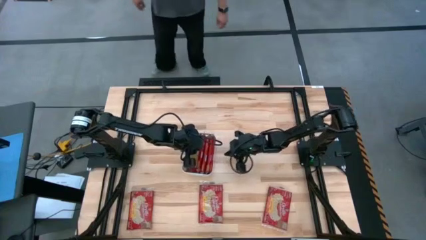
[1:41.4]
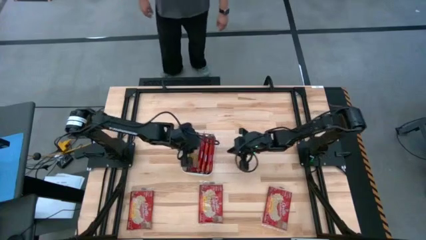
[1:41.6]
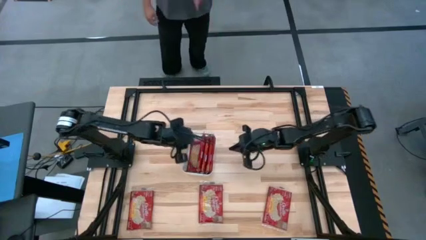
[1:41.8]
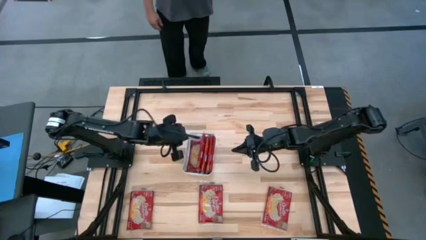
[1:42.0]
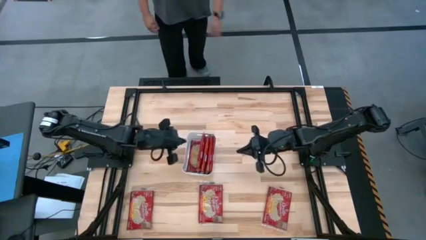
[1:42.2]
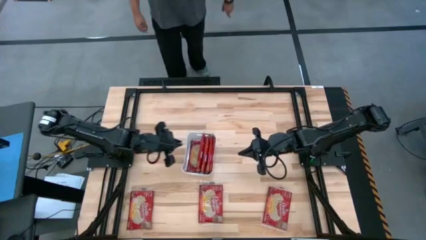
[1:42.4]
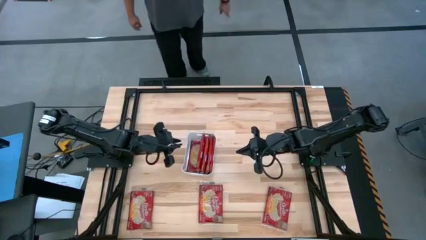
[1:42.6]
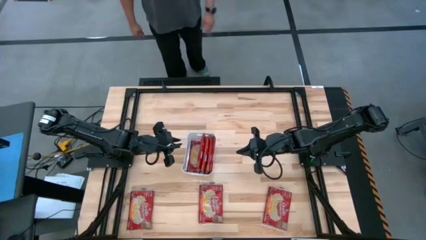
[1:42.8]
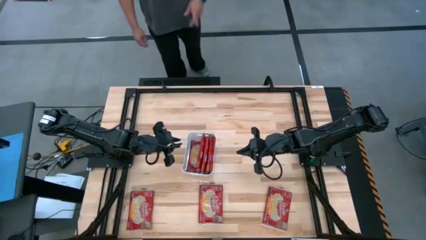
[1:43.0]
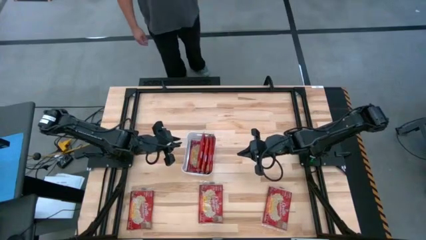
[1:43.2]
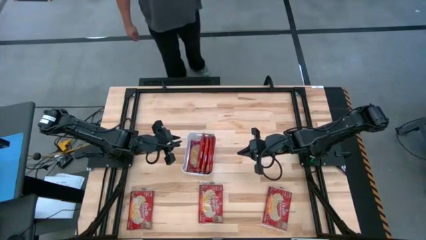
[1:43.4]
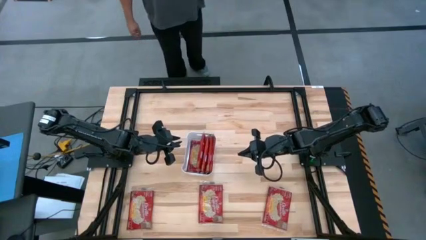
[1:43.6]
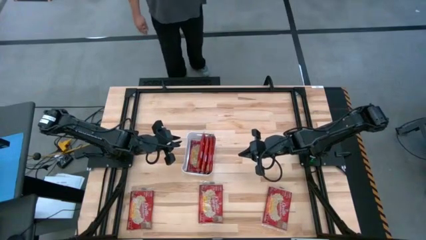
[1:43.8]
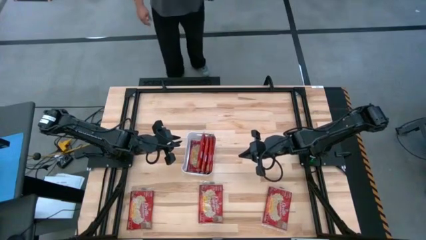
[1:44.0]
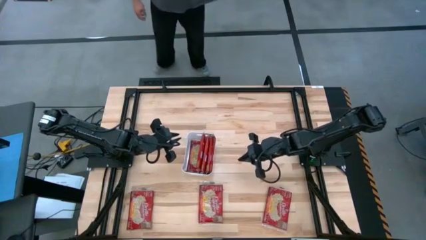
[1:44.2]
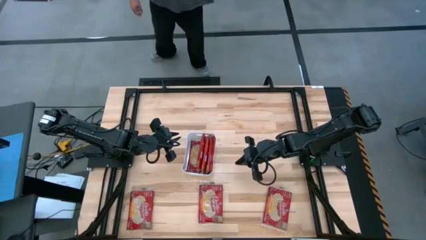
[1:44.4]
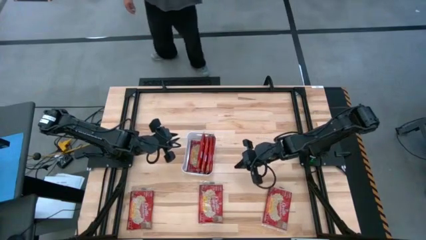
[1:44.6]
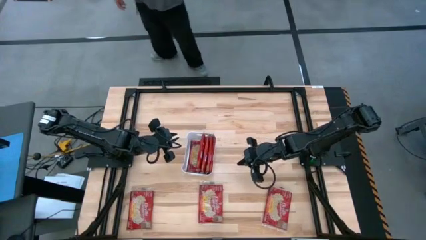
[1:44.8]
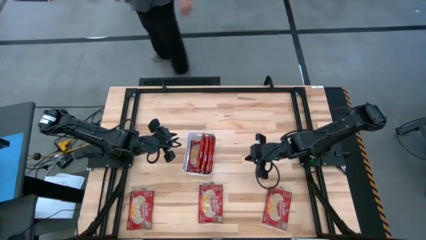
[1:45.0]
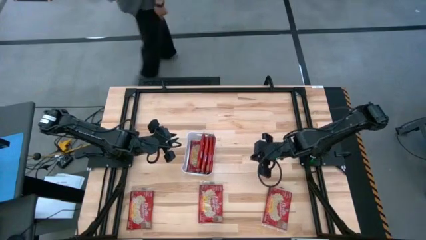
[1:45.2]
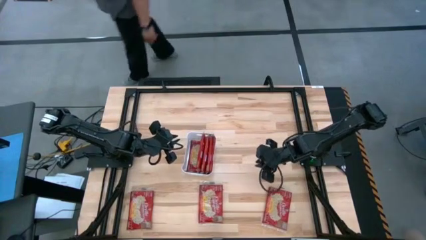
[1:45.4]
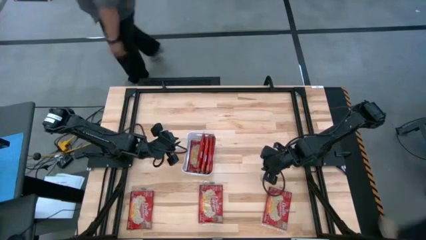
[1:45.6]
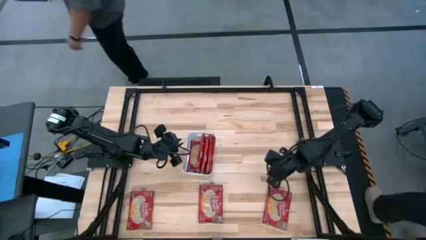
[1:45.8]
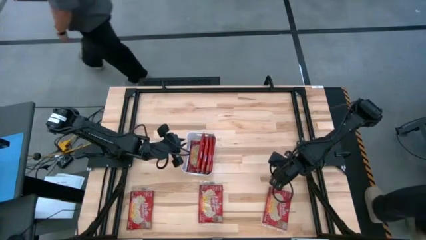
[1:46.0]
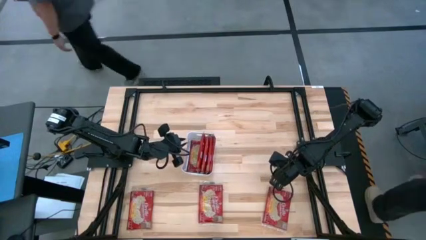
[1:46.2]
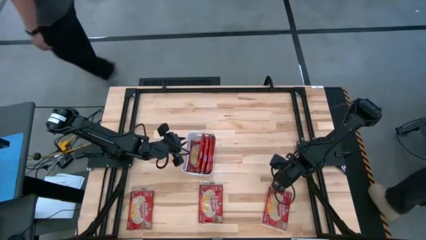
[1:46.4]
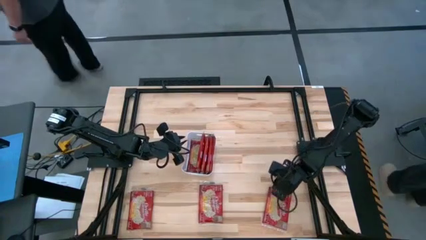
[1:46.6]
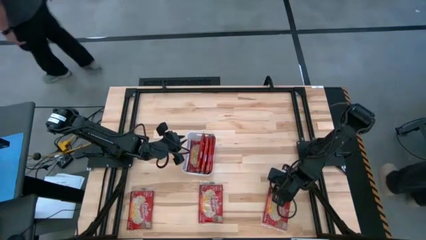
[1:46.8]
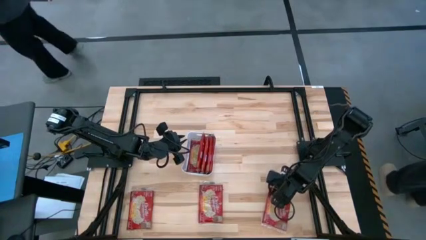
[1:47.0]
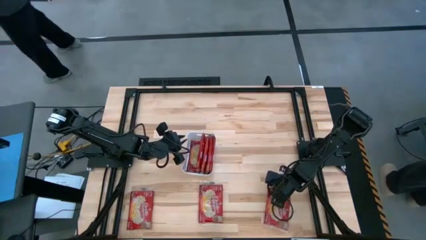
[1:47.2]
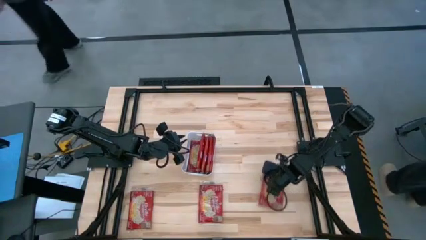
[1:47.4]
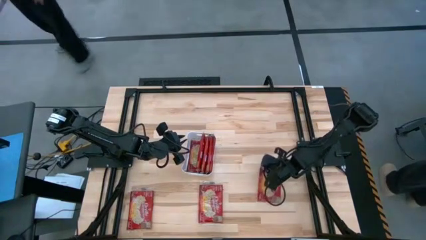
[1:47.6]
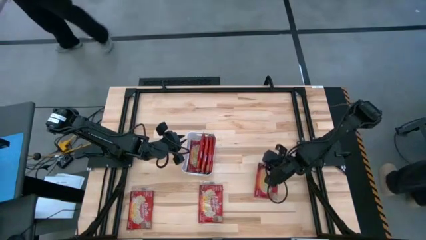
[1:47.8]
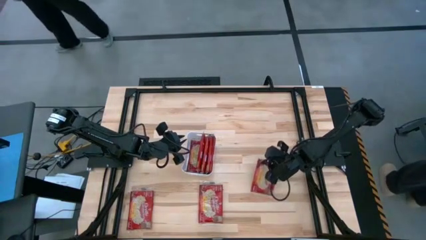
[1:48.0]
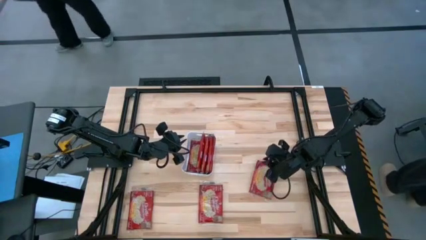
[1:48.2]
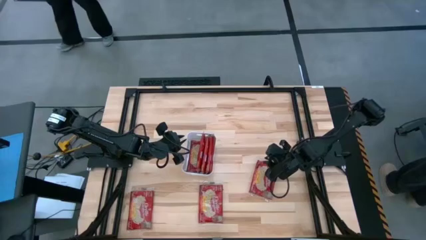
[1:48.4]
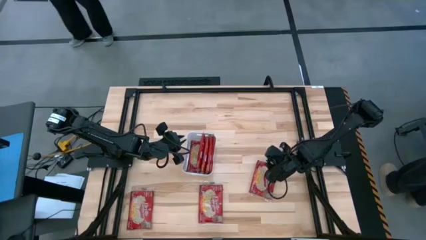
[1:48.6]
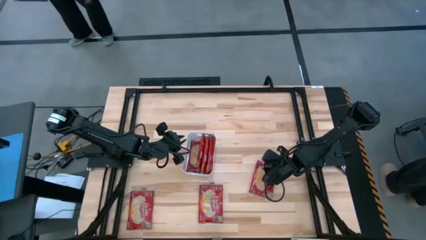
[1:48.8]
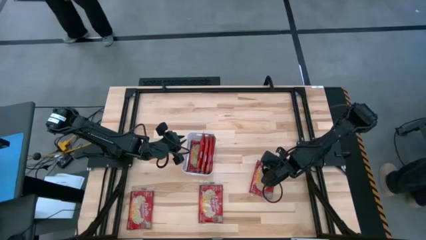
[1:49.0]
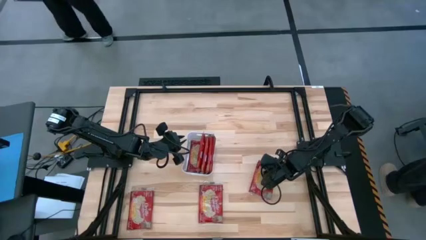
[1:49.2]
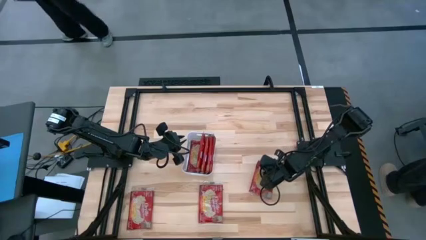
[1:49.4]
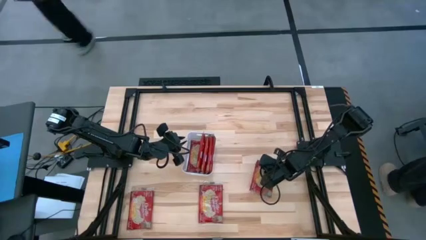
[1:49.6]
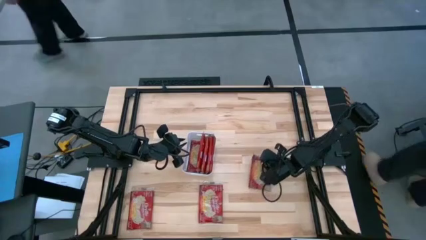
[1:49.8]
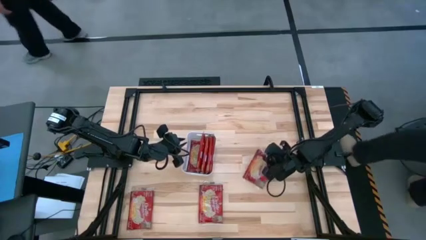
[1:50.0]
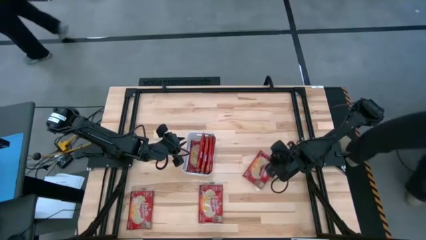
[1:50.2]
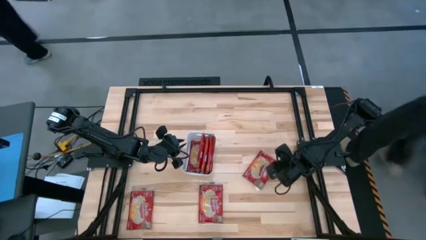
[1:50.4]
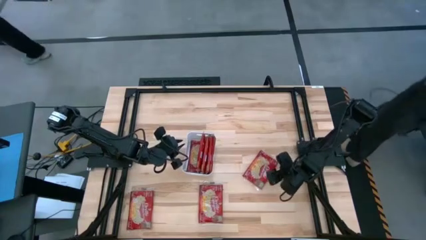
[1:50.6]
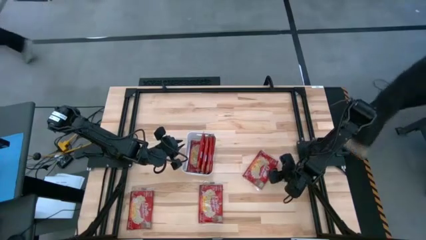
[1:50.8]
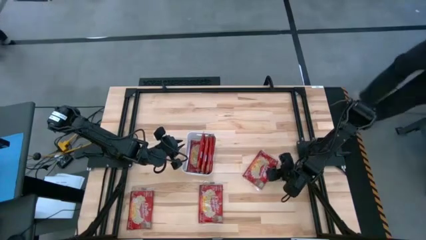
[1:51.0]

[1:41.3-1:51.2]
Task: Sort popcorn bags into baskets
Put the red popcorn bag into the white bin

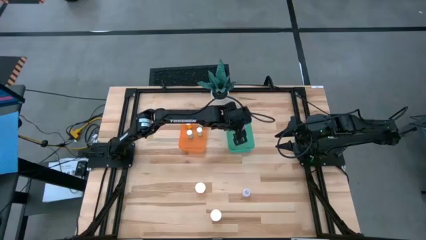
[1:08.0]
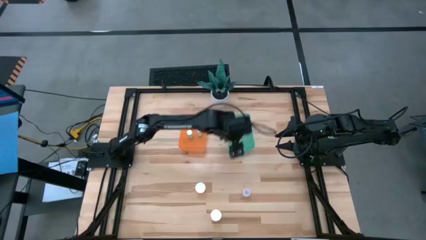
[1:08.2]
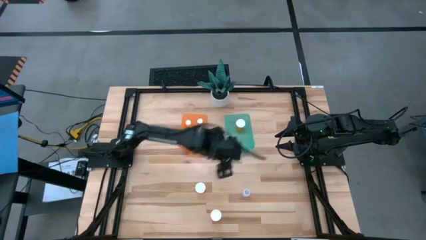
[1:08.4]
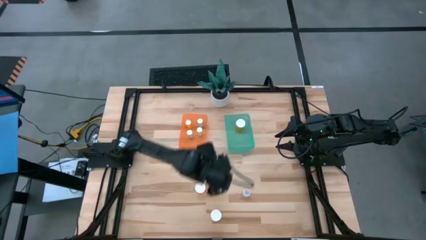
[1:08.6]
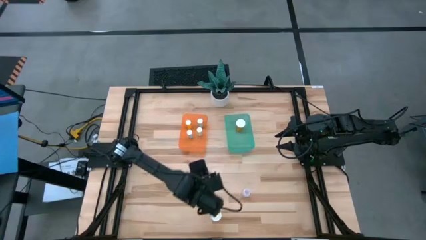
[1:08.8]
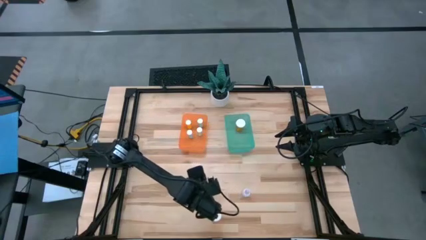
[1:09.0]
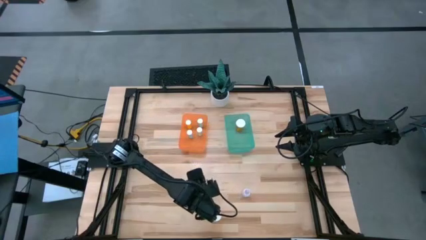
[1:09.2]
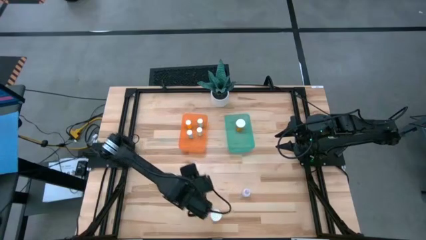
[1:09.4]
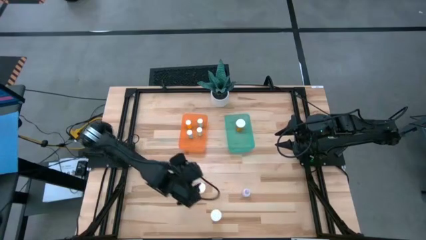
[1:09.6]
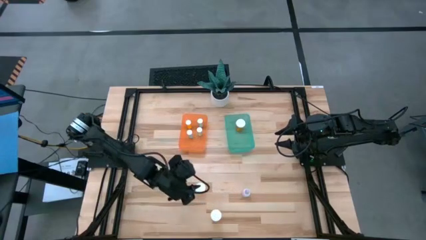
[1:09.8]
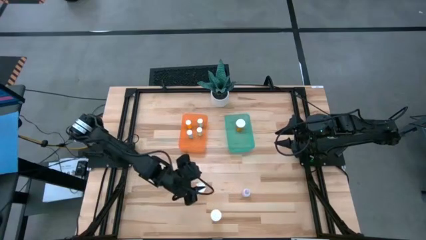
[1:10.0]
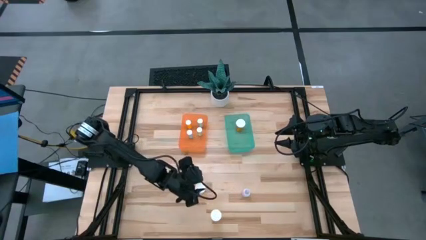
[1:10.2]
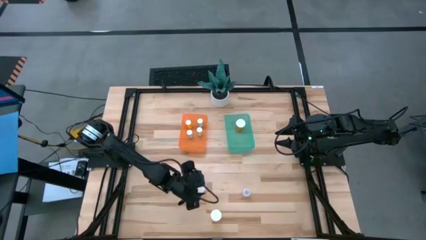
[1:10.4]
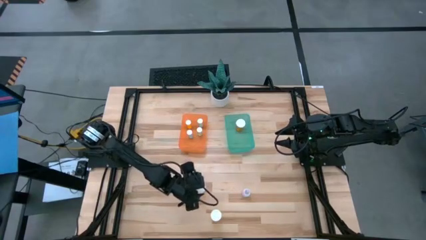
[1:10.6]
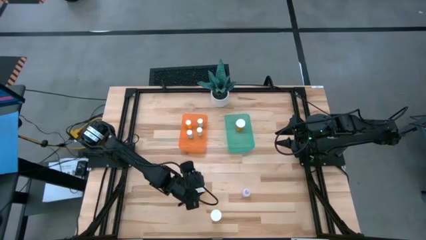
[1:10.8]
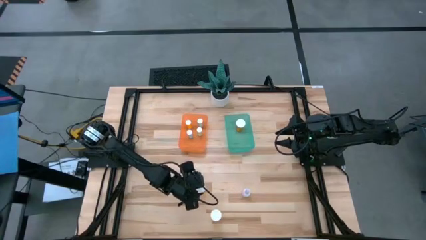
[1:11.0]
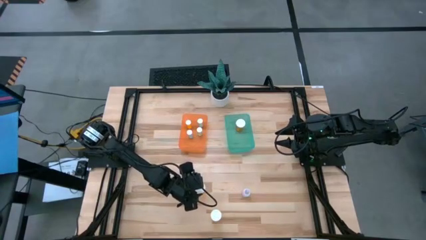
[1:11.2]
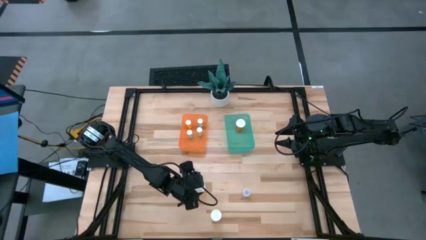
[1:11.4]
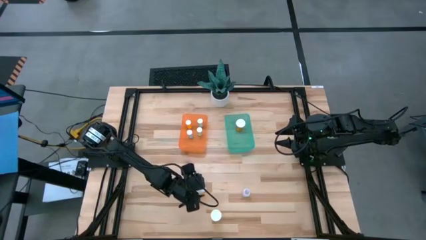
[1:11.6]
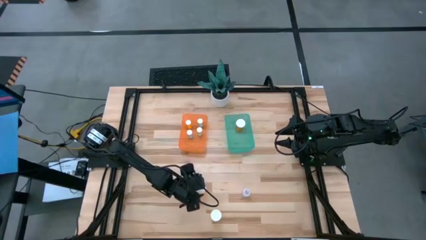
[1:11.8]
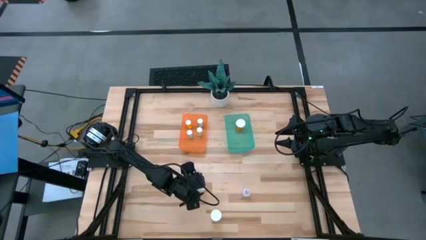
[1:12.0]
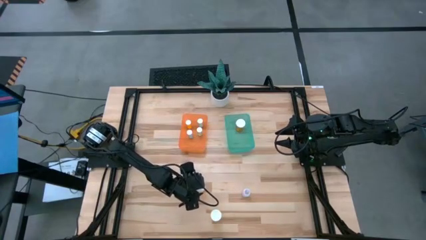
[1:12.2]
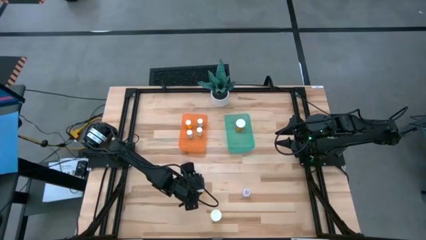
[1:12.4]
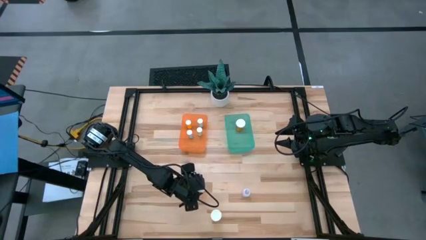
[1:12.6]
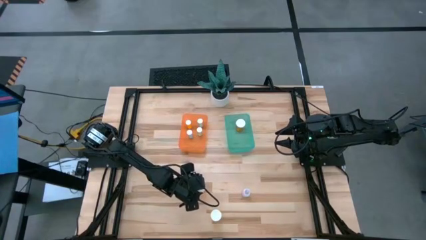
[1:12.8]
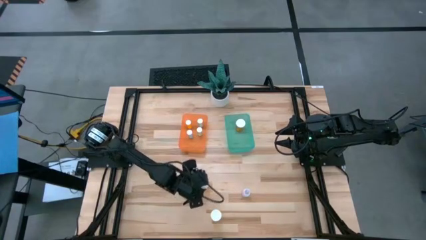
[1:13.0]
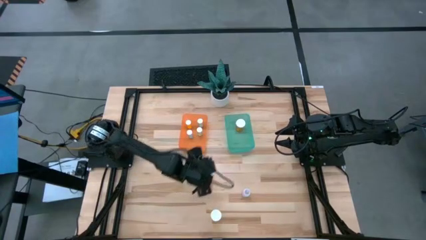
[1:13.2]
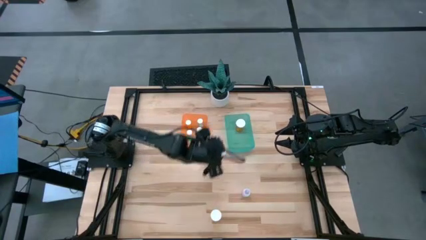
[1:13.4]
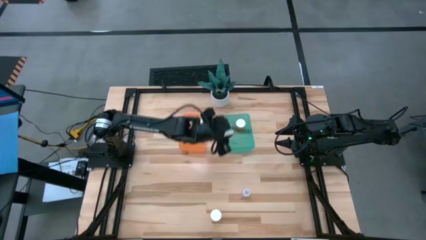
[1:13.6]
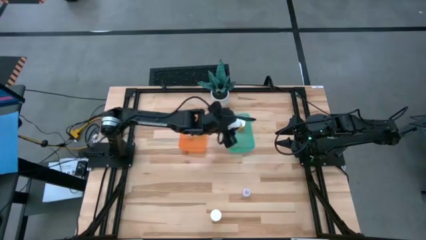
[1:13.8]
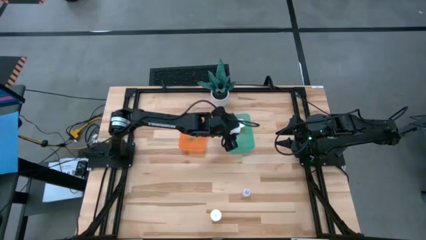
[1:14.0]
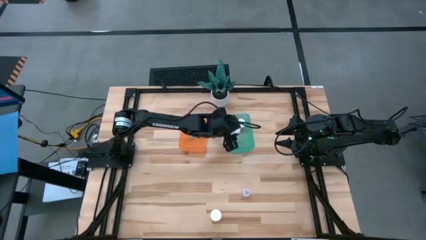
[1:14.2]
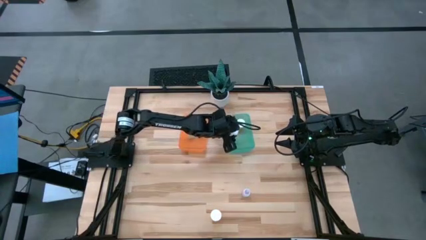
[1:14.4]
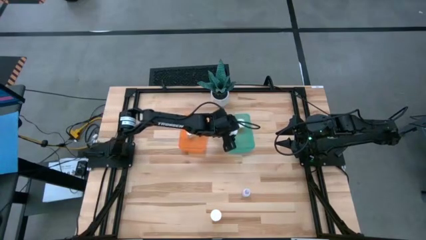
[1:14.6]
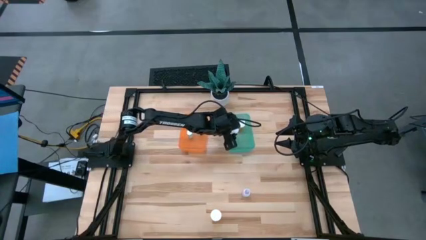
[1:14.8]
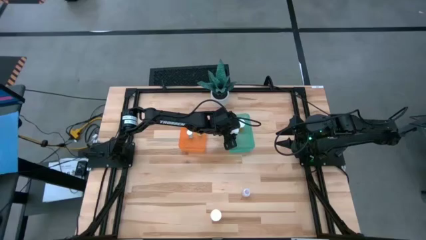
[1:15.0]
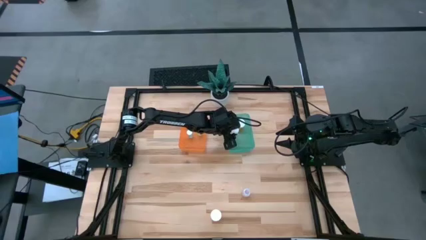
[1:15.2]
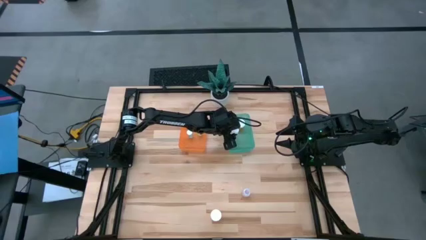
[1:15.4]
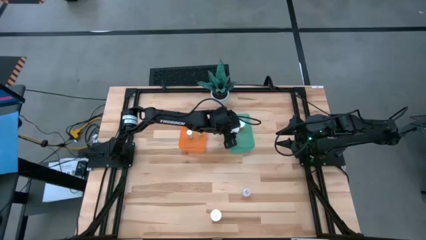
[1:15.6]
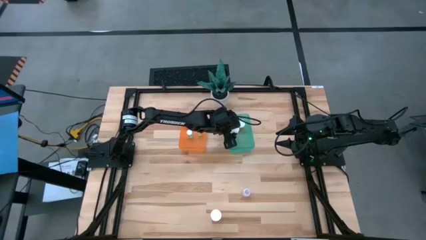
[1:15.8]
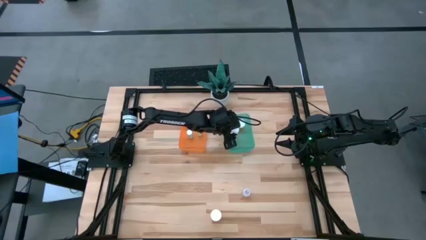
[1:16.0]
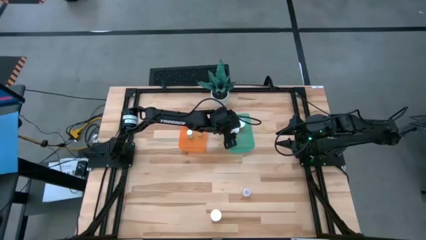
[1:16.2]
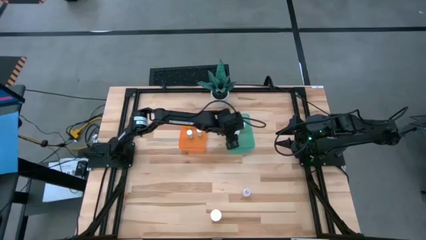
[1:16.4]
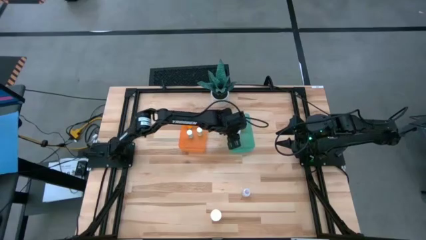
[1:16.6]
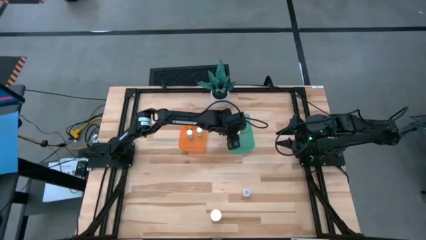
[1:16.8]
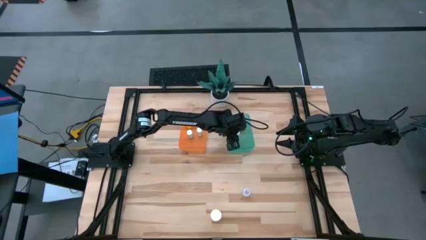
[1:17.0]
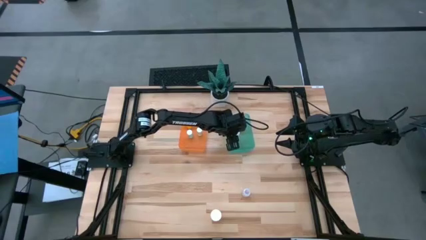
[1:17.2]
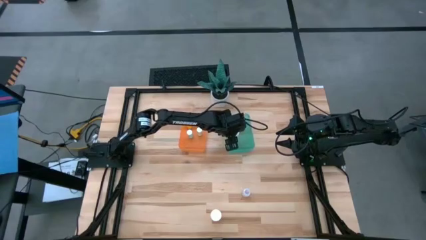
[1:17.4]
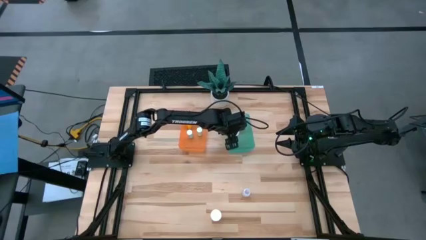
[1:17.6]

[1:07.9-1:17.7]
Task: Pick and place medicine bottles into bin by pill shape (circle, oval)
Put the top orange pill bottle into the green bin
